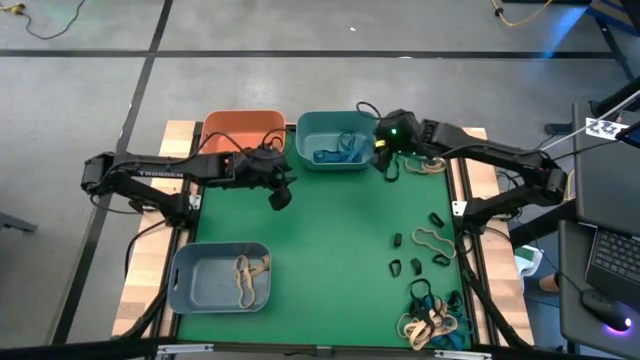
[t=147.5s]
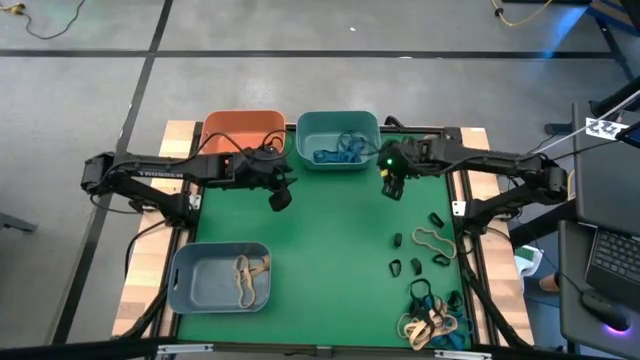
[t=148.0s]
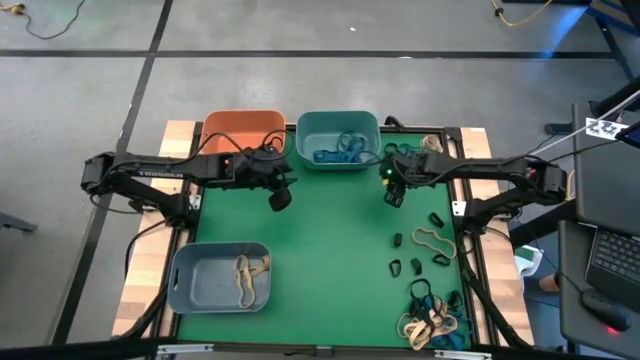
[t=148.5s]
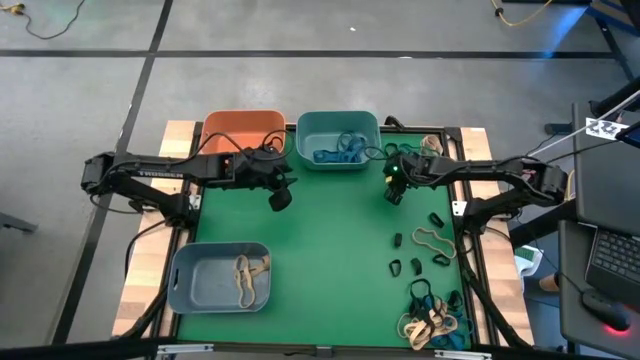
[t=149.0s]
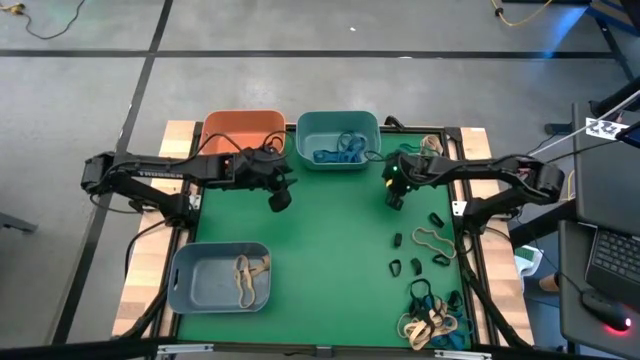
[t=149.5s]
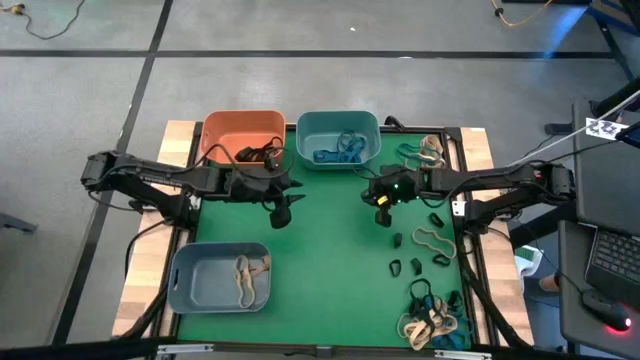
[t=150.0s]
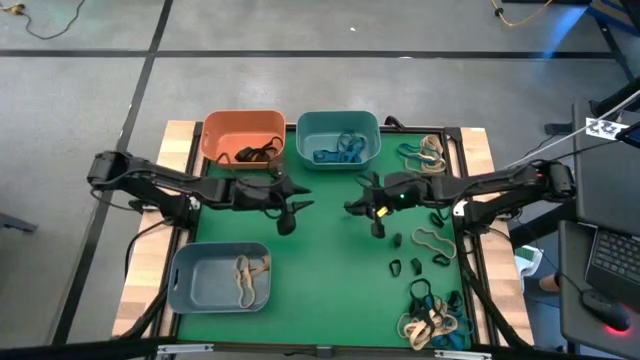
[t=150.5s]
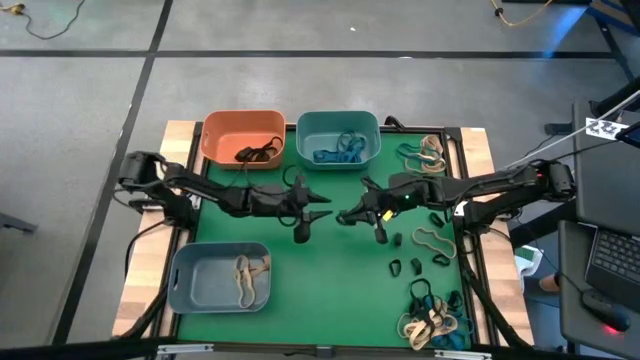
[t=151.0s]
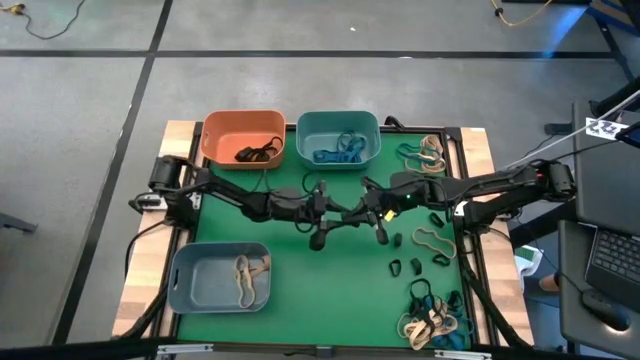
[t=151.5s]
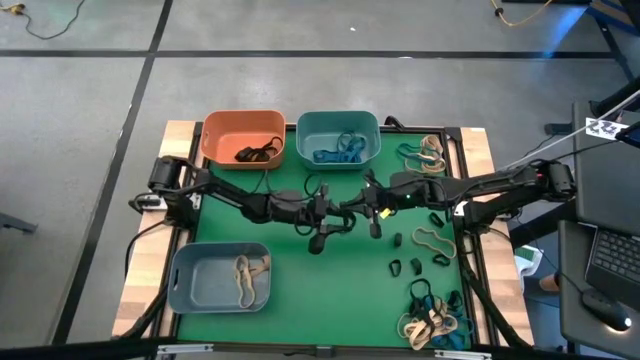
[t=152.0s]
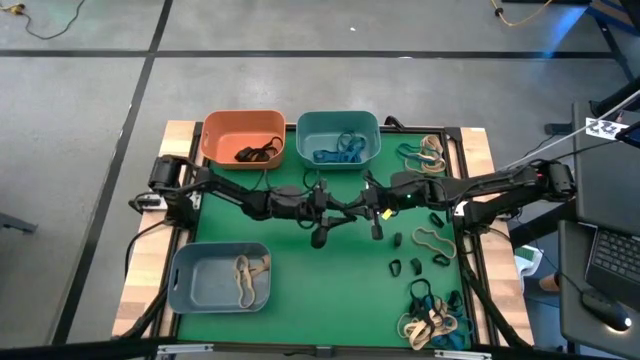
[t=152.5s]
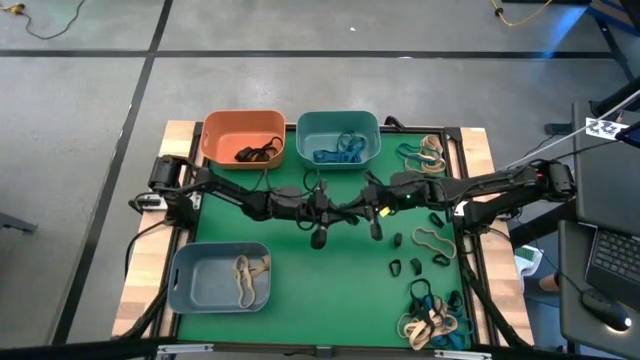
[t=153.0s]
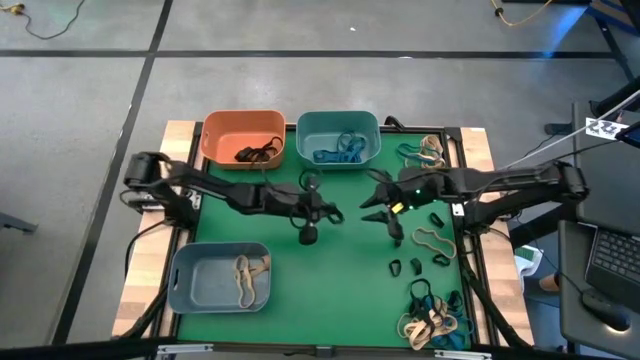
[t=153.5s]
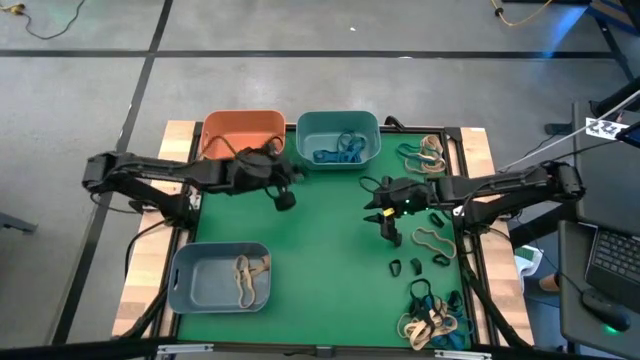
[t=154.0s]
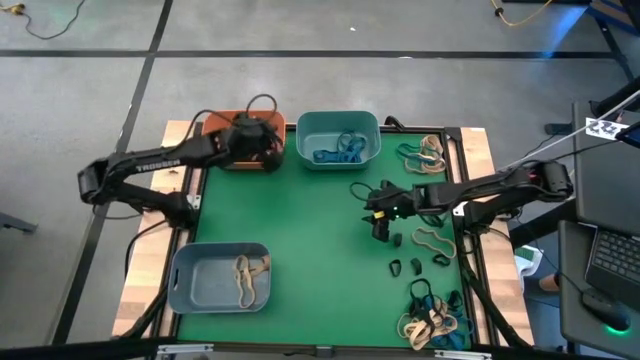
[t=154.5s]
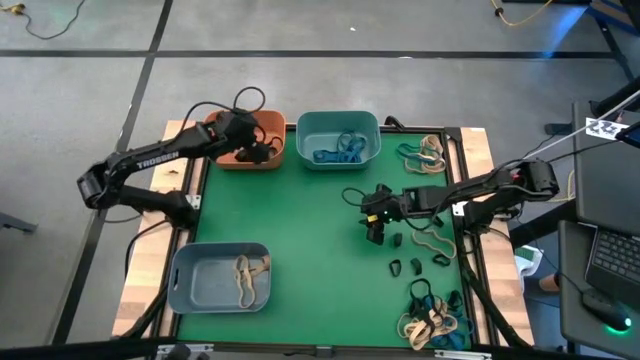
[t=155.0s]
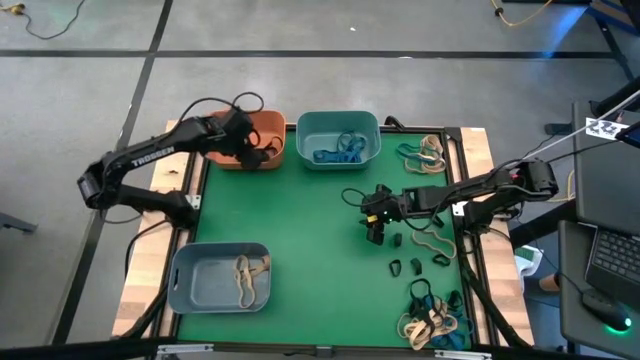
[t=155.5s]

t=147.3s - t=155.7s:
Task: Sort rubber bands into baskets
Put the black rubber band into the orange bin

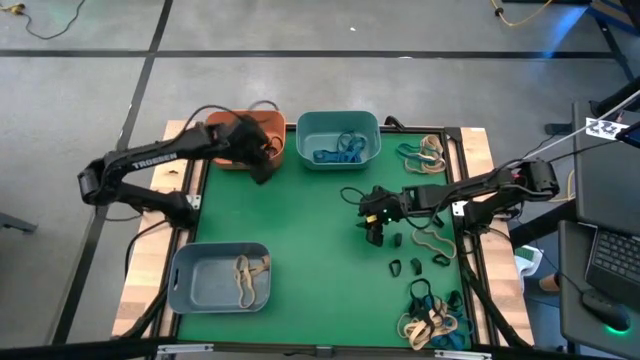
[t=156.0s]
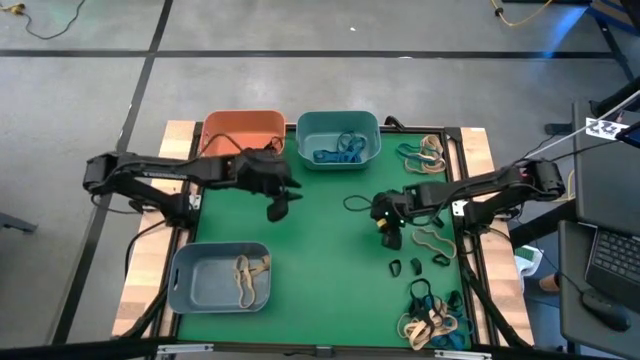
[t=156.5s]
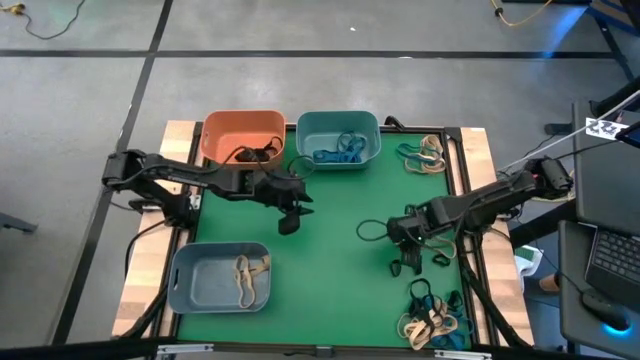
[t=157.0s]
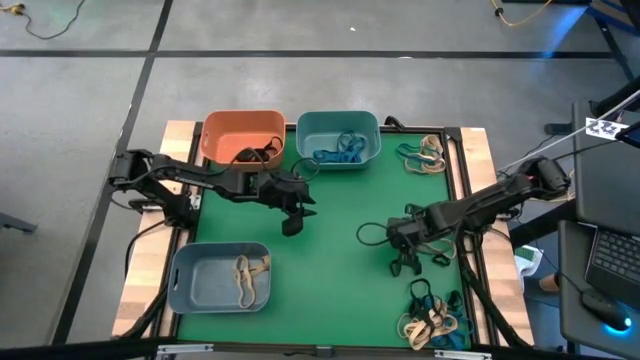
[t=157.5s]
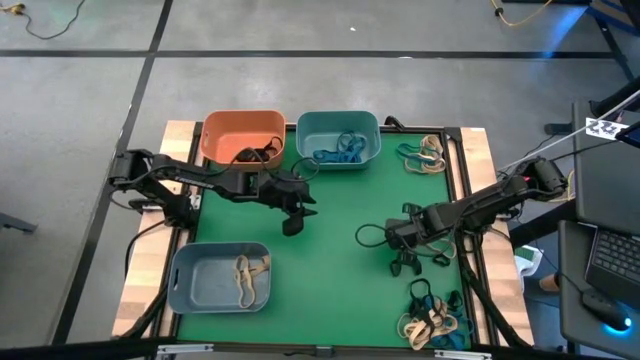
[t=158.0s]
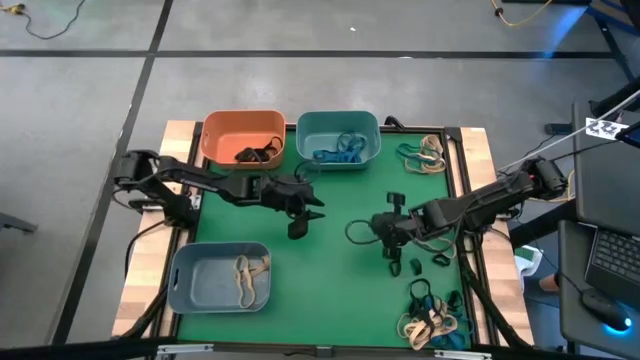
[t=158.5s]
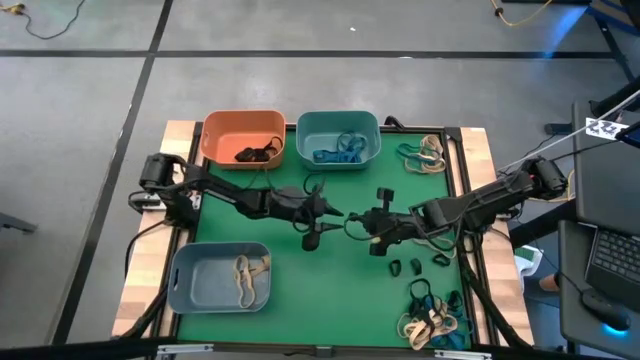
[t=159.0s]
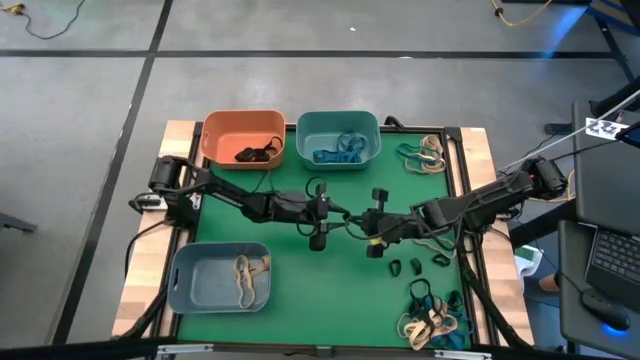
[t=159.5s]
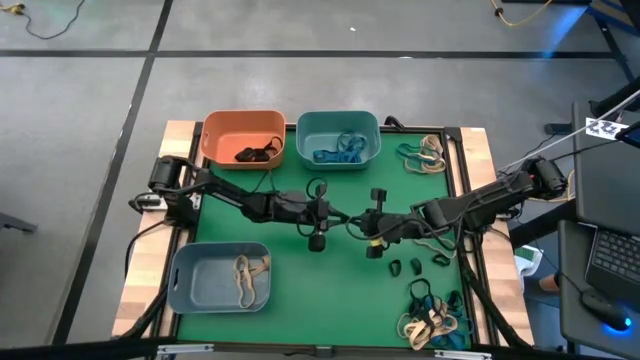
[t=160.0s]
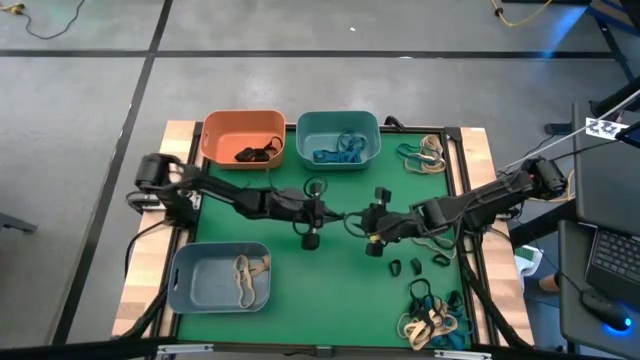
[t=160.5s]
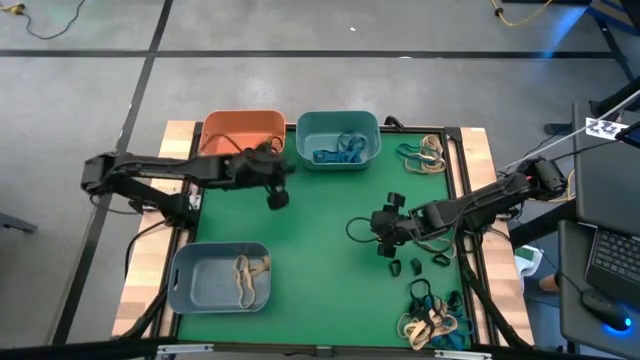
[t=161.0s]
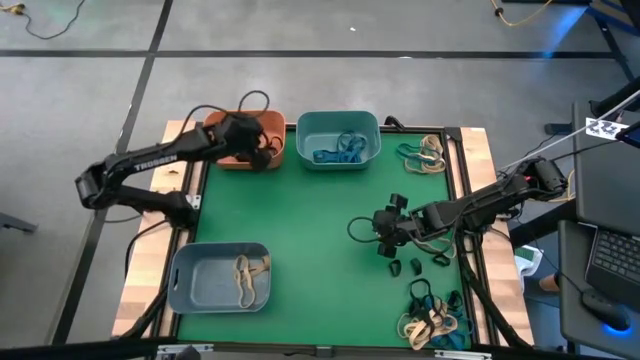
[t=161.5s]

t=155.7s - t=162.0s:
Put the small black rubber band into the orange bin

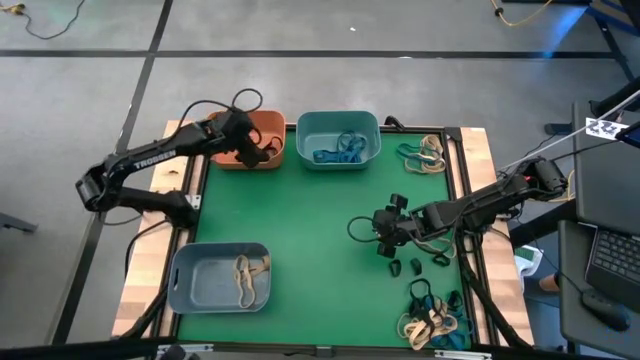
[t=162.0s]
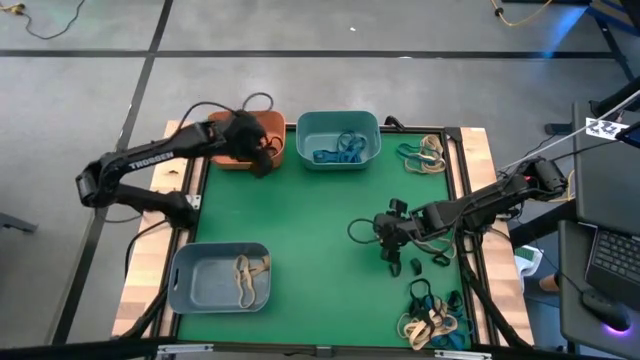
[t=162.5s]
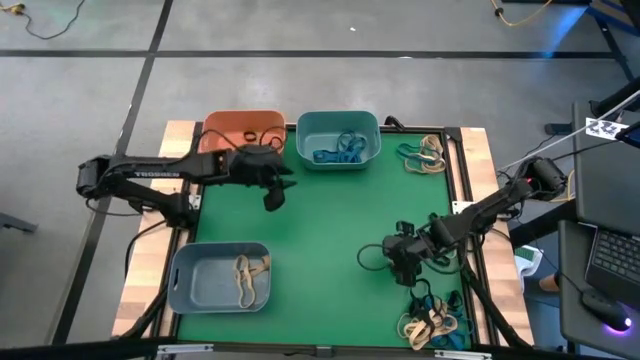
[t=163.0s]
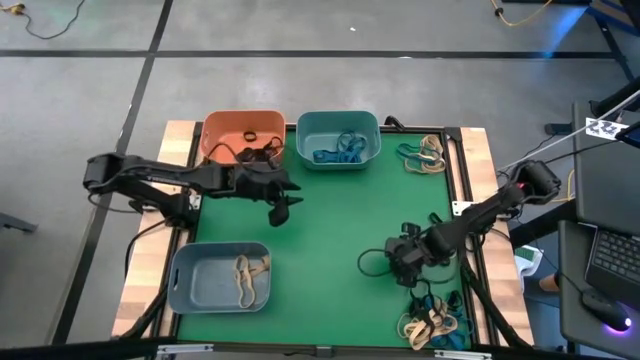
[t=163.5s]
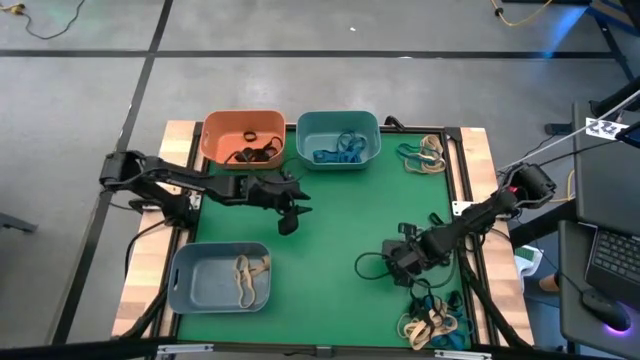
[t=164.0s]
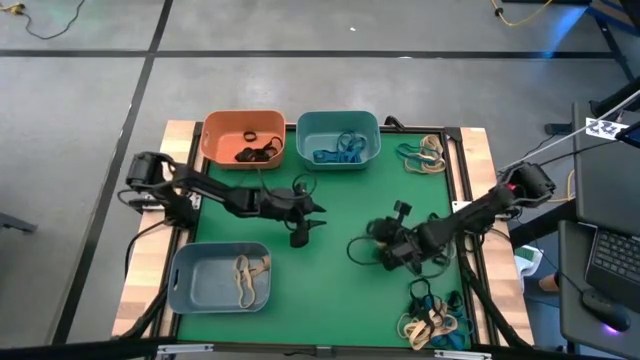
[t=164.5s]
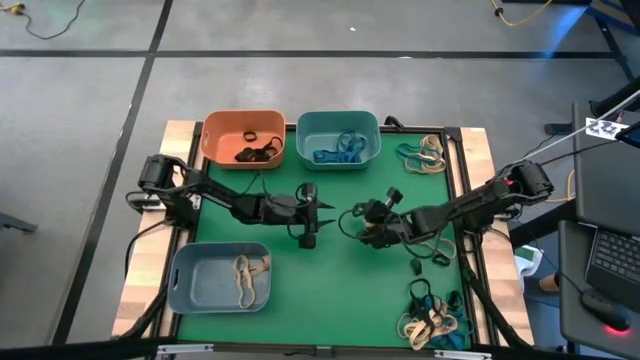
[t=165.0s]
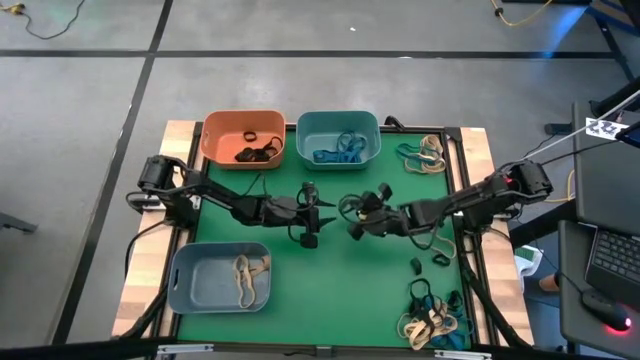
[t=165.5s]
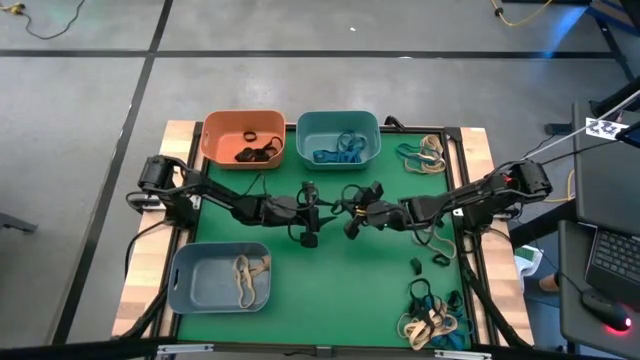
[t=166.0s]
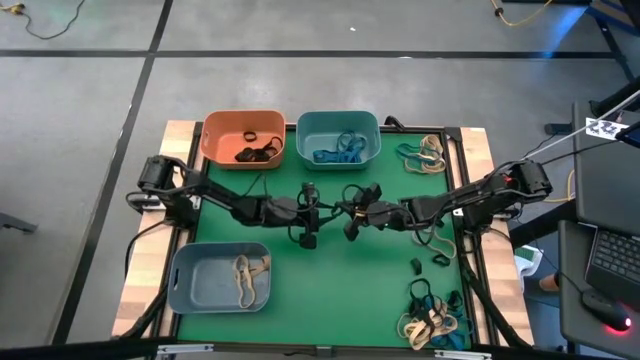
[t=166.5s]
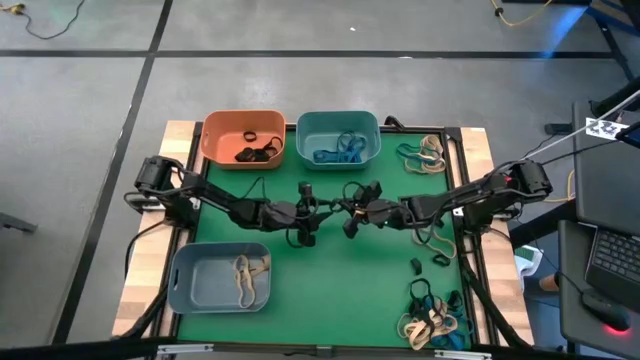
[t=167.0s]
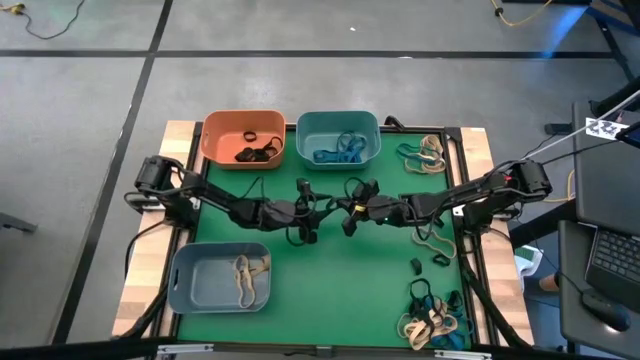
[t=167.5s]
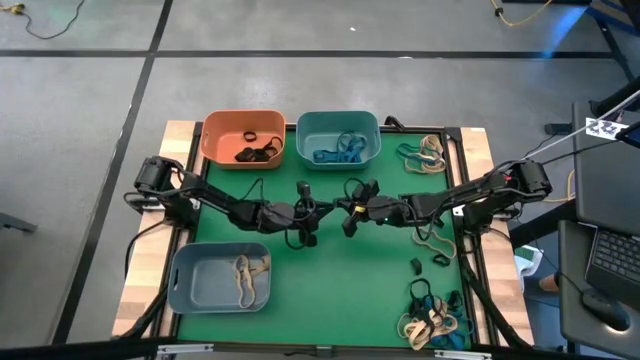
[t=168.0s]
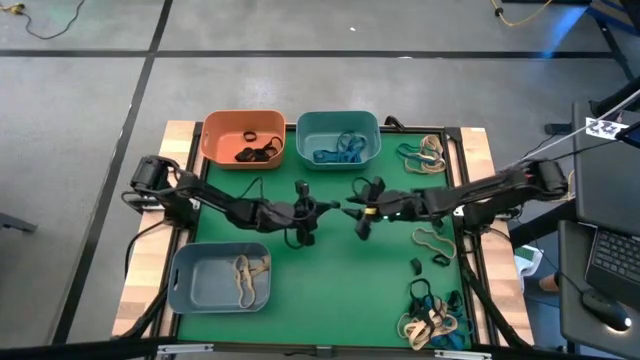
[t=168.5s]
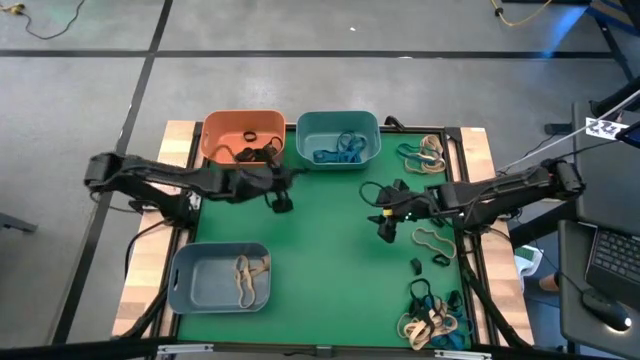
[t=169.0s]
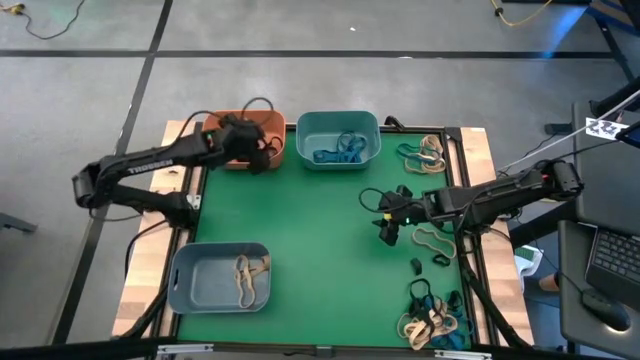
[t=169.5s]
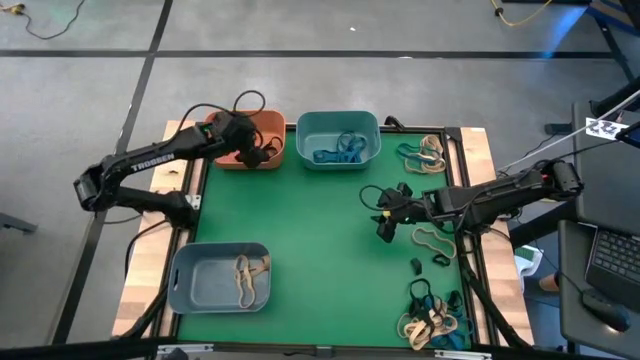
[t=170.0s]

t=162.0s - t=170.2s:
Put the small black rubber band into the orange bin
